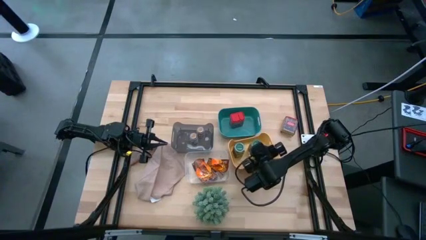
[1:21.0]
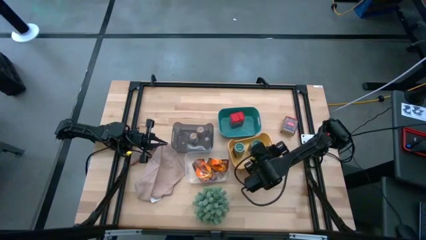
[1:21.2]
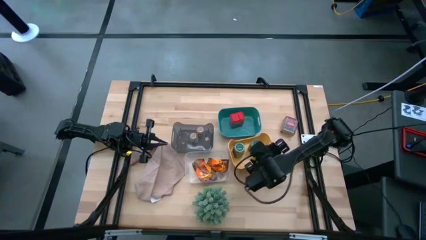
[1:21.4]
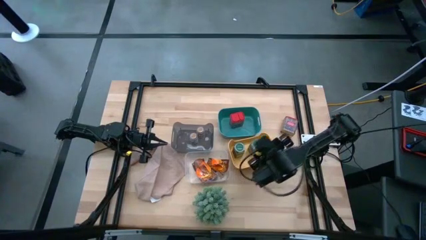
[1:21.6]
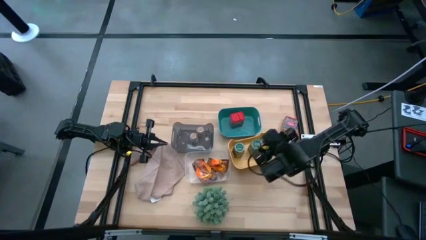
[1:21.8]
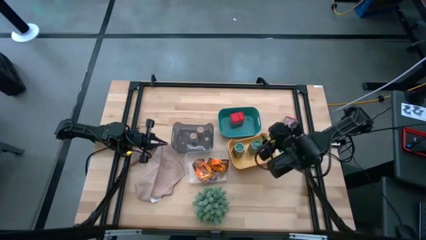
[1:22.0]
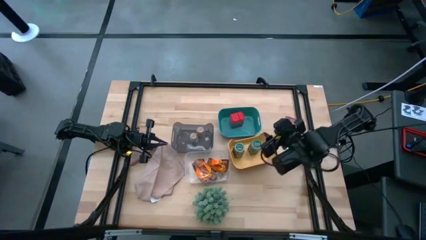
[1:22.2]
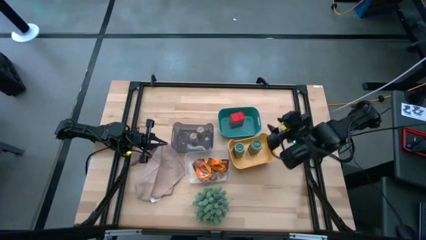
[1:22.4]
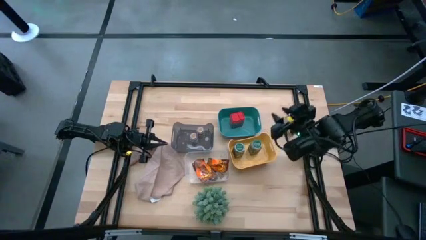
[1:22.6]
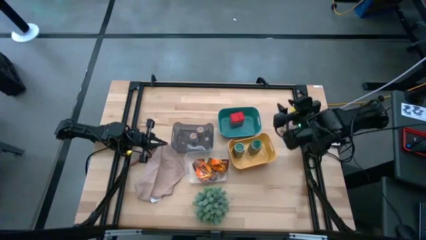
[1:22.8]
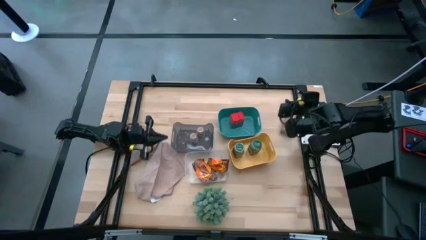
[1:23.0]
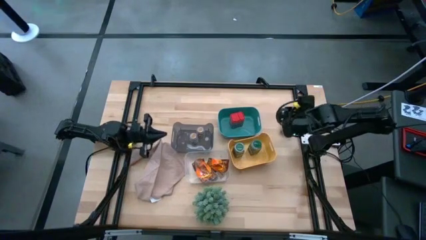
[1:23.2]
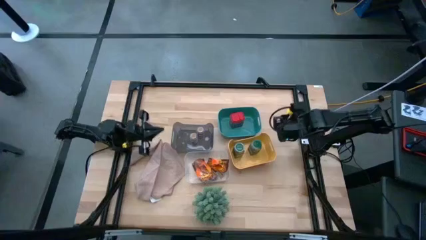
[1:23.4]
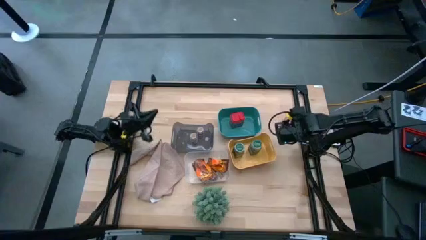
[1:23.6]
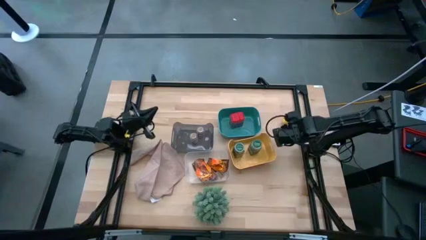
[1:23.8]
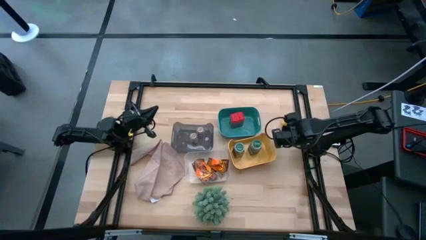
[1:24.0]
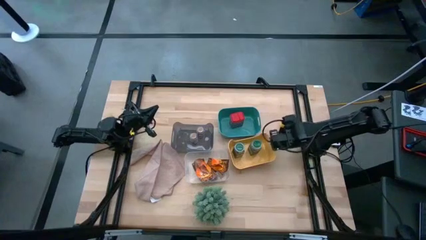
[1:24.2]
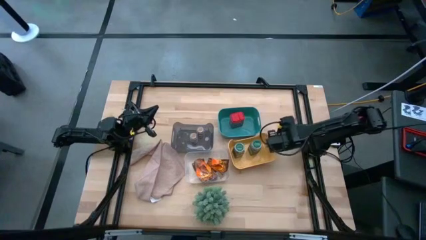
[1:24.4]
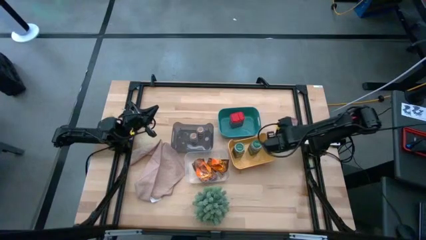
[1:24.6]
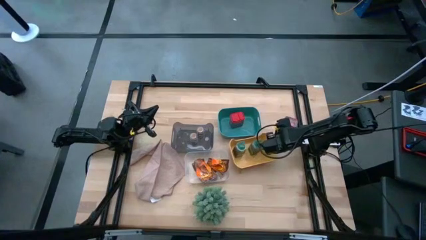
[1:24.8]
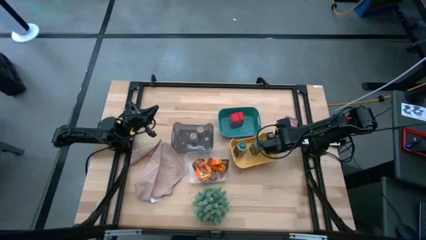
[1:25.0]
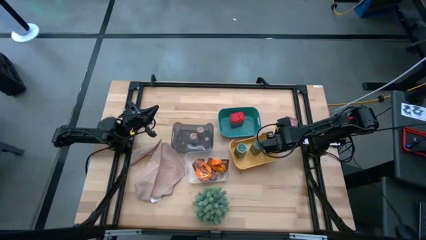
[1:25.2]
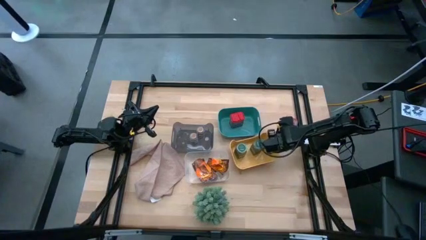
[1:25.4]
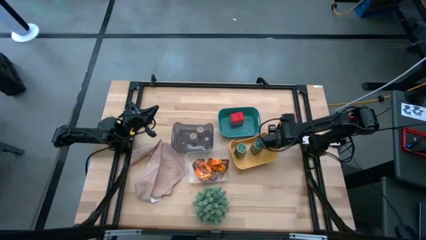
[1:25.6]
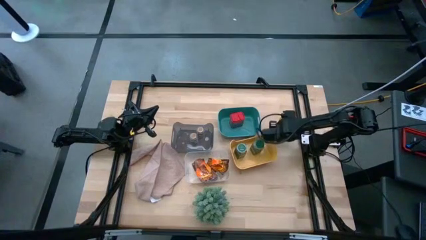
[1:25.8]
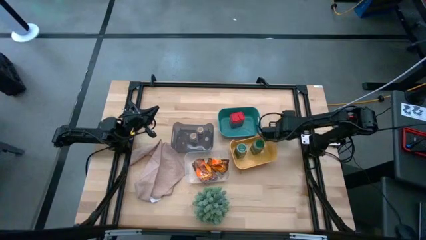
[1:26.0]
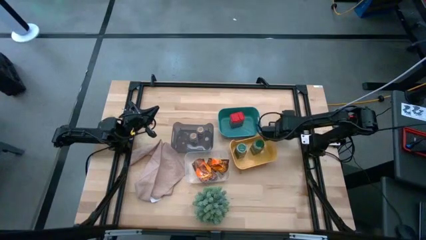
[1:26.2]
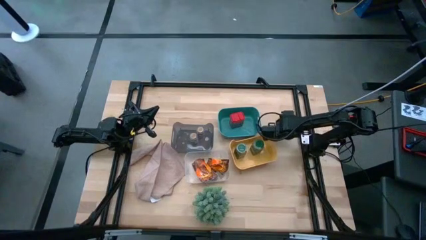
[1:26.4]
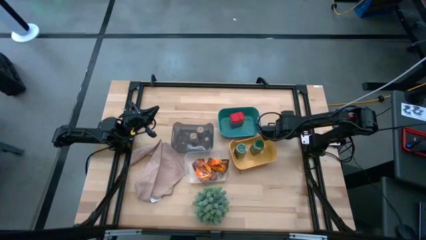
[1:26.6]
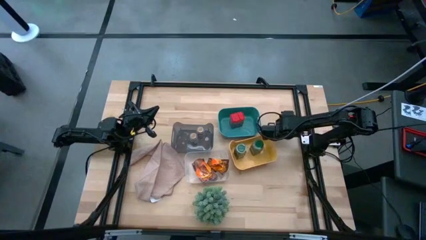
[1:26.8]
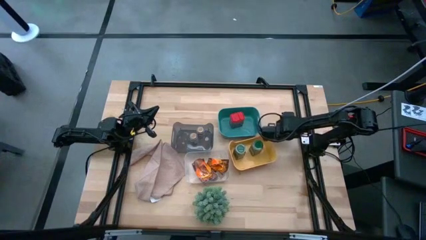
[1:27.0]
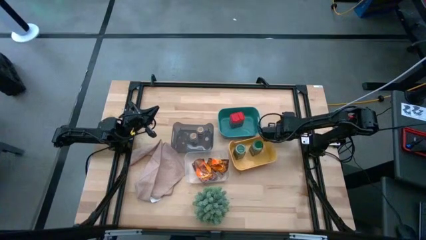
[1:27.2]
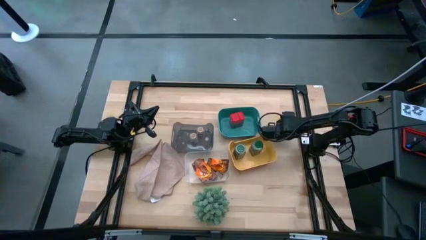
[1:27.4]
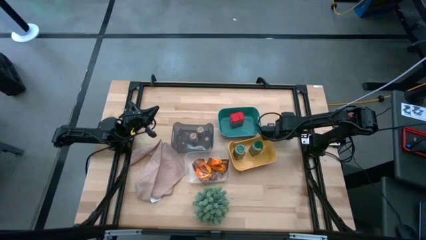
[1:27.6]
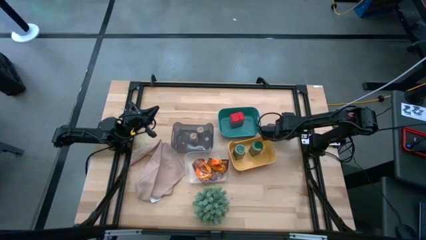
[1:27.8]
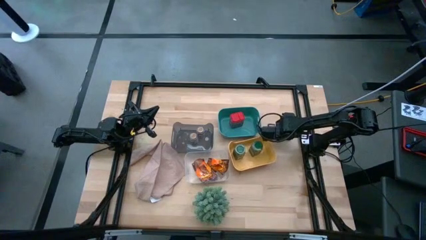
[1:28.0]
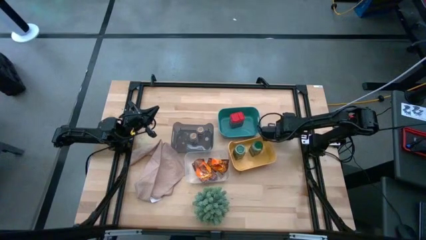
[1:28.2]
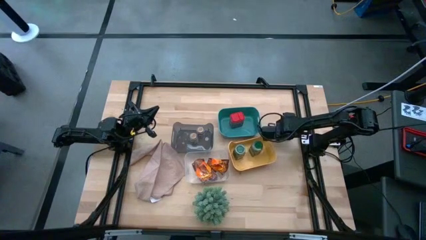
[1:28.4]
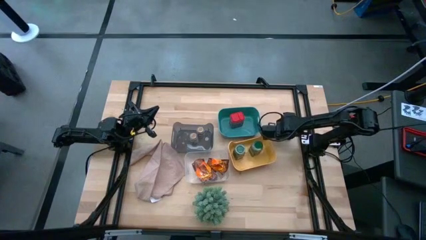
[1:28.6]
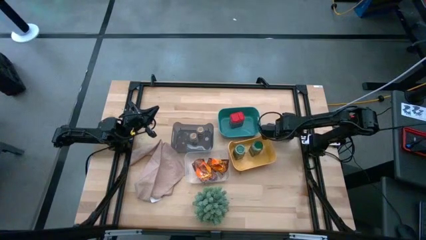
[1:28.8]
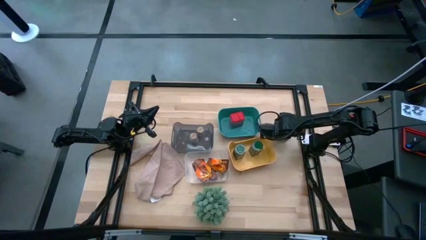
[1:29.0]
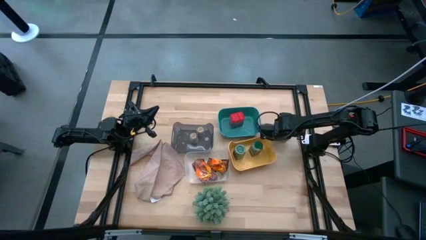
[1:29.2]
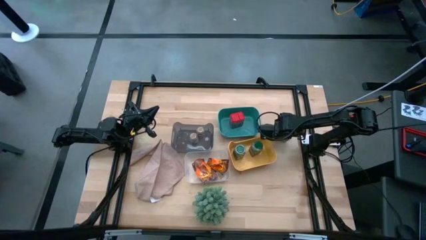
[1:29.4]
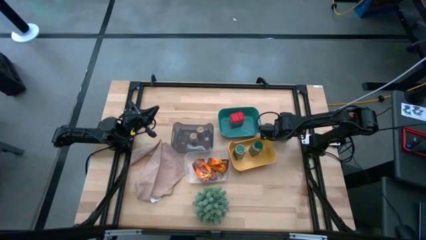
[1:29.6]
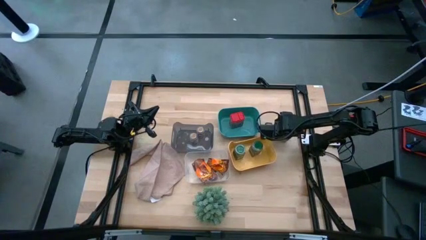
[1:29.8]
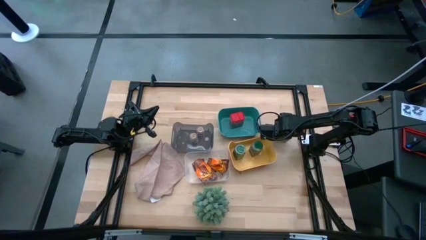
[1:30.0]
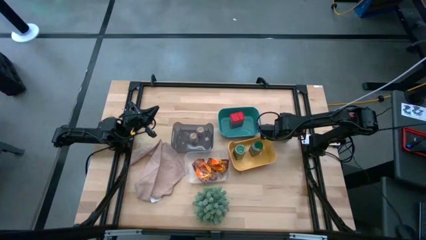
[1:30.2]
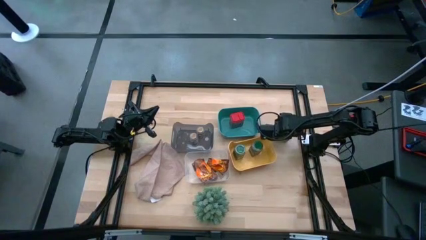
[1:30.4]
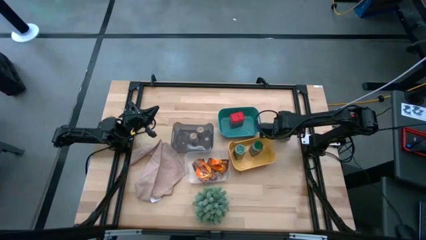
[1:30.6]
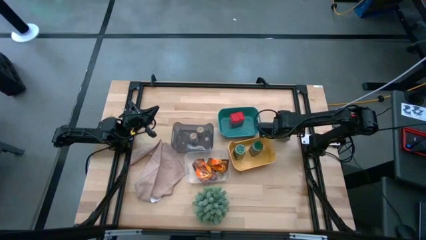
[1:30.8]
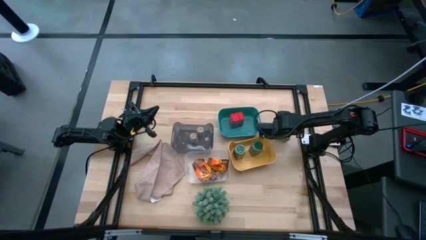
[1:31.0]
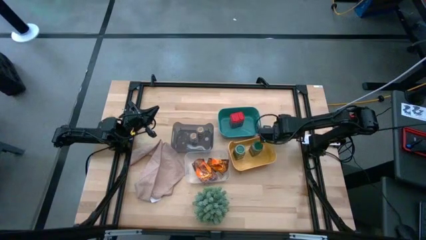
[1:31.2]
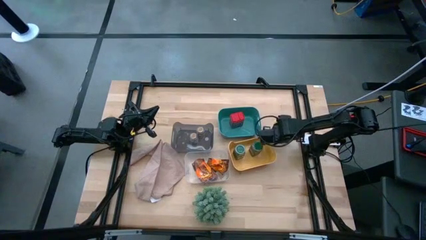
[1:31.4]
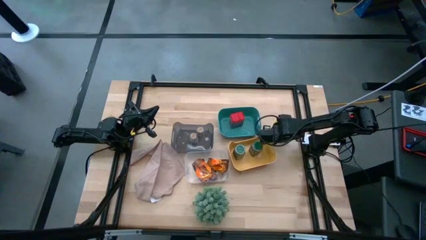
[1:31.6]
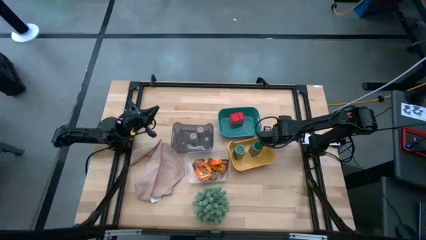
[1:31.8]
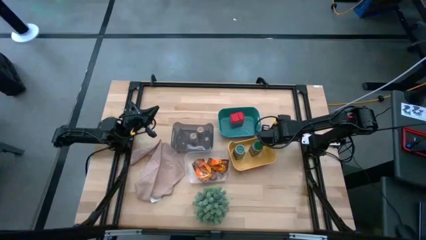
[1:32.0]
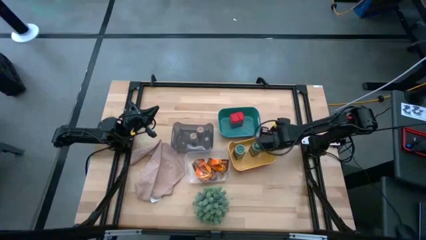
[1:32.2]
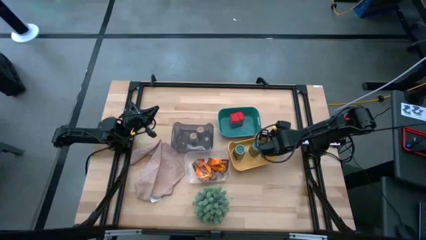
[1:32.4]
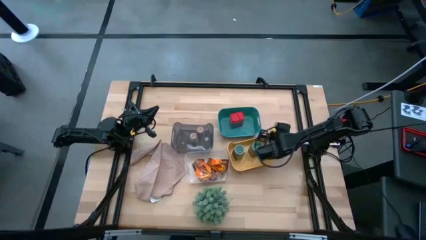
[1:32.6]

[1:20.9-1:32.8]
Task: Sort spices by type
Put the red seasoning can into the blue bin

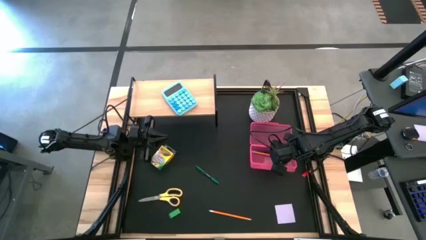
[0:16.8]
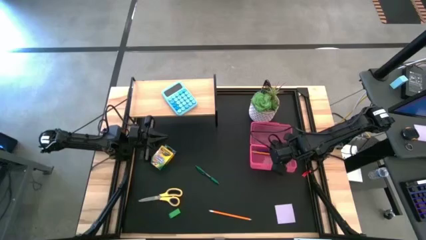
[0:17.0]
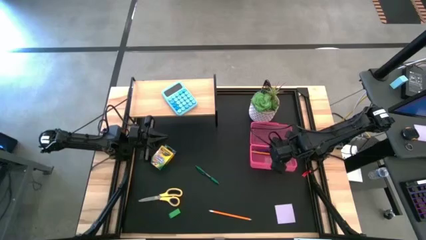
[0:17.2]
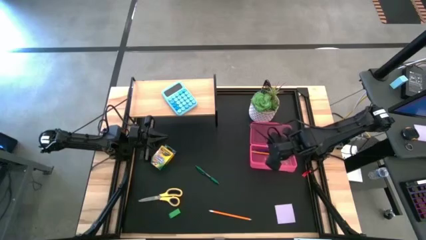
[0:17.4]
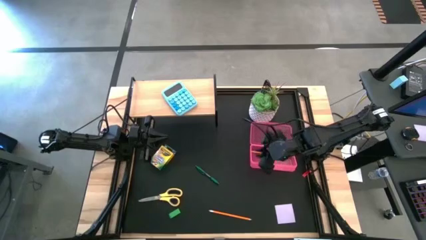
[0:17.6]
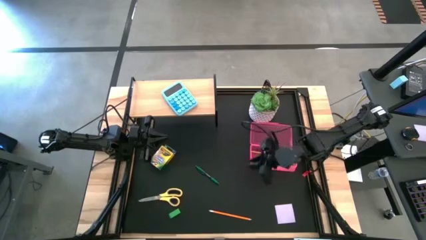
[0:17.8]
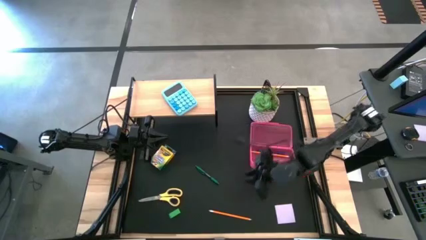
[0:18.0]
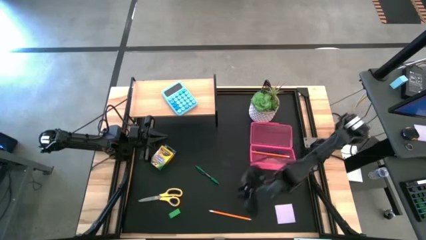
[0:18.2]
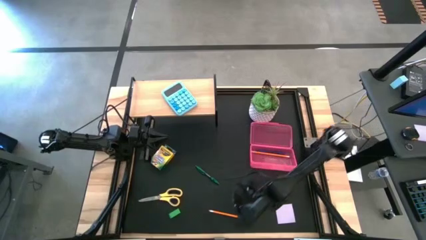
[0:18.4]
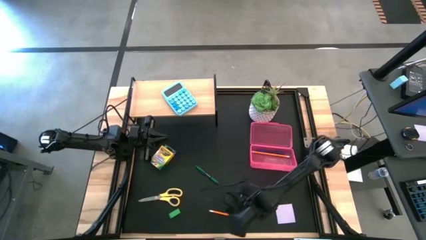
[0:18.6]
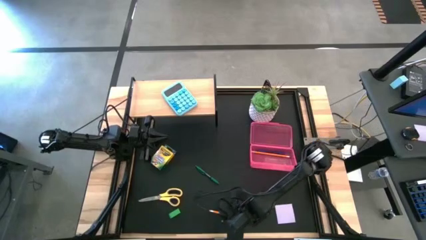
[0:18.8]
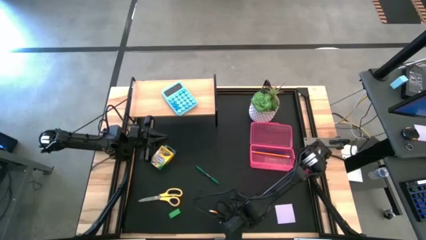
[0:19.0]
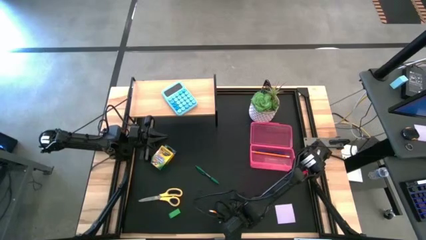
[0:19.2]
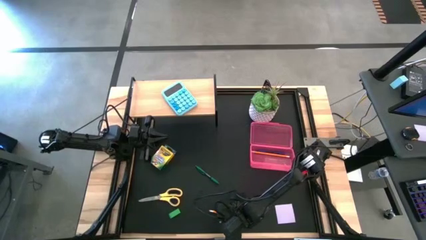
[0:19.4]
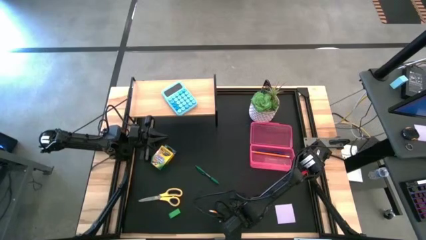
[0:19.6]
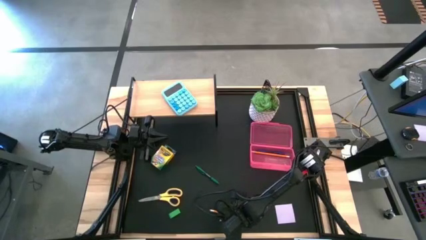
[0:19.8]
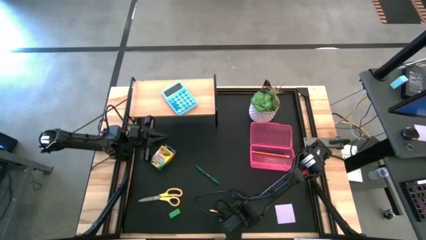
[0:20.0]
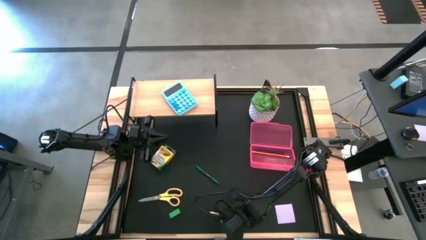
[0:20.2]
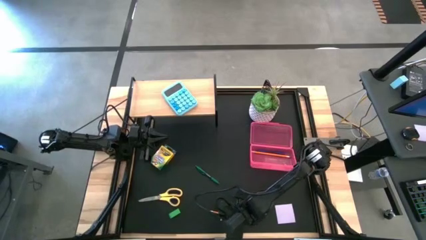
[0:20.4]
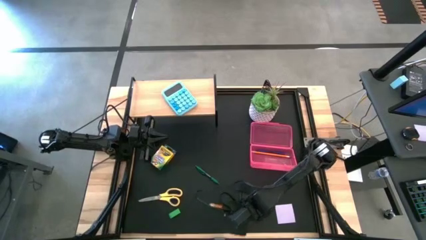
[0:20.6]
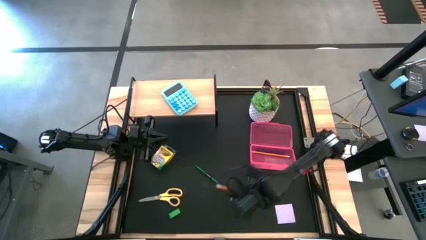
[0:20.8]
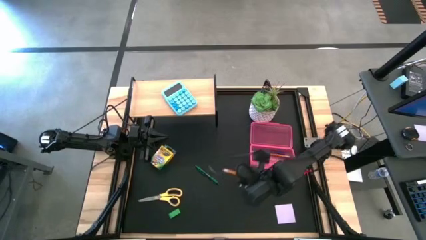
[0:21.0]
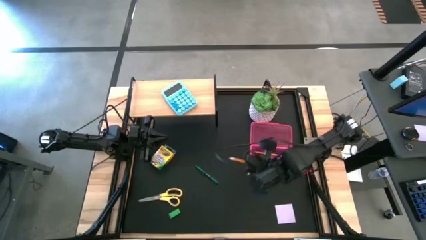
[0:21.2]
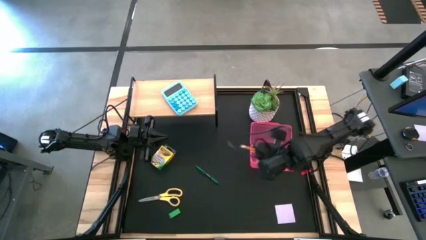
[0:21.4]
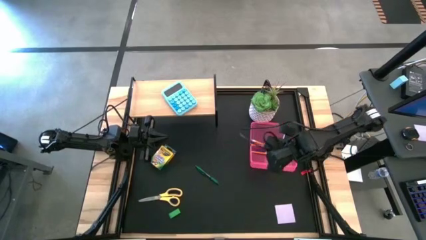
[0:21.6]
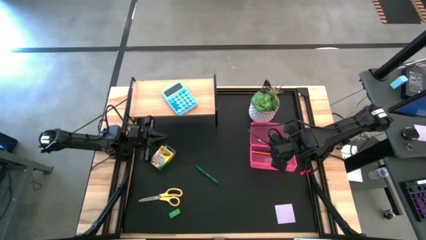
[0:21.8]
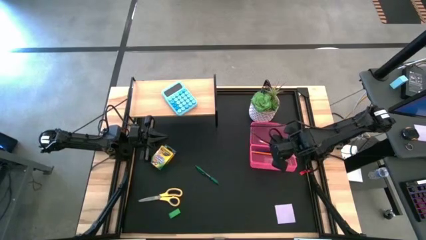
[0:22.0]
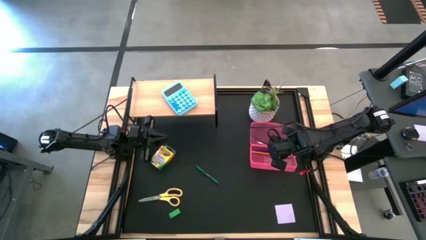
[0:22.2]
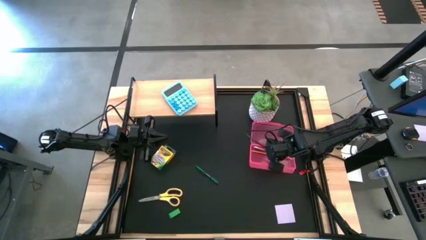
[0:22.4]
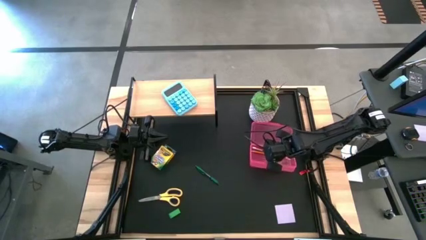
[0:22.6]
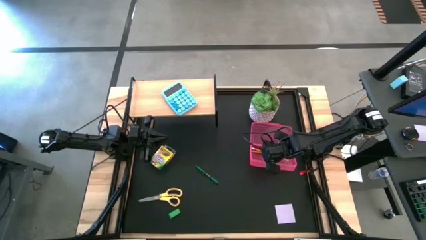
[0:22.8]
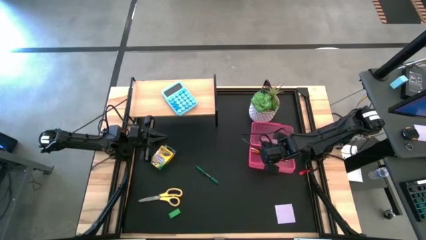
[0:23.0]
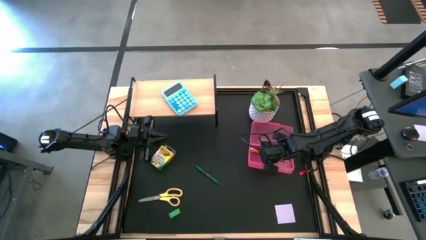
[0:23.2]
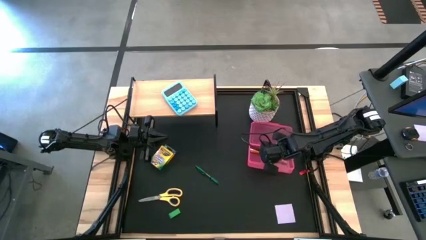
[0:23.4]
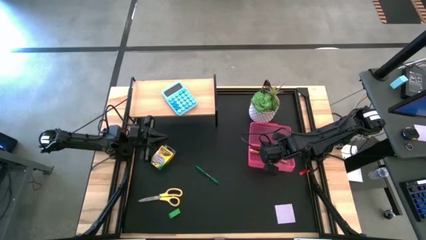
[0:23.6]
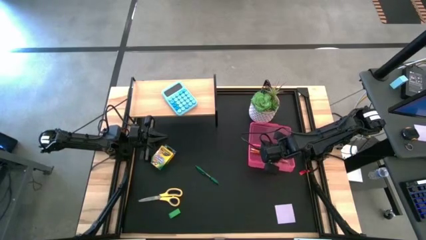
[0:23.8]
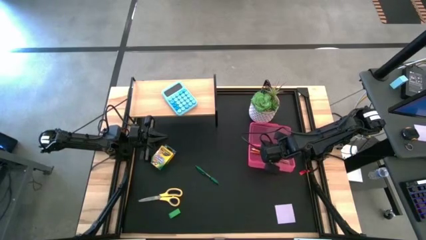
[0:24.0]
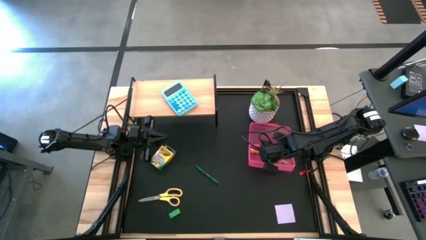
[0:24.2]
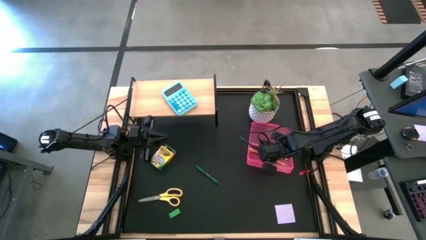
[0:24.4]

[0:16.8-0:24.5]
Task: Pack school essentials
Put the orange pencil into the pink supply box
